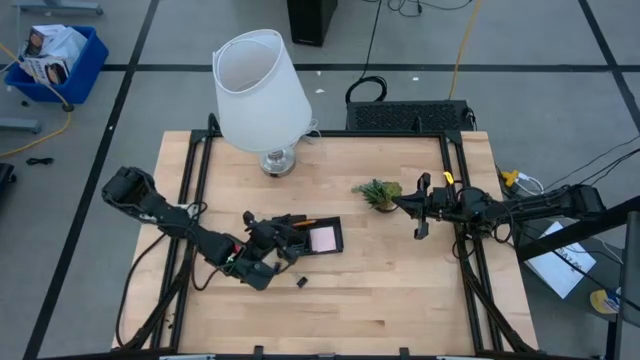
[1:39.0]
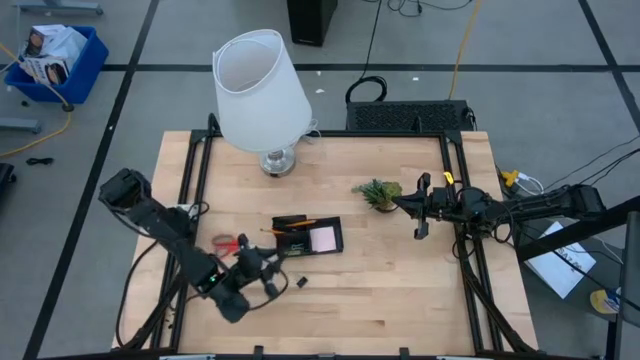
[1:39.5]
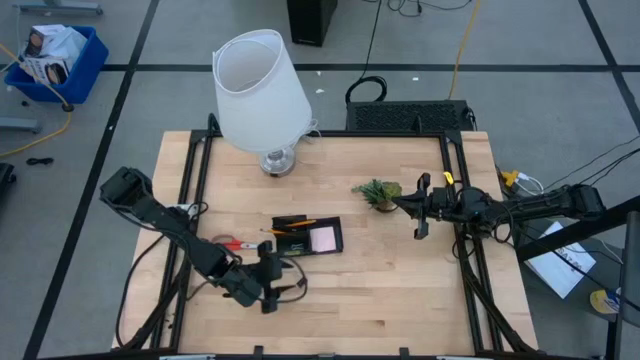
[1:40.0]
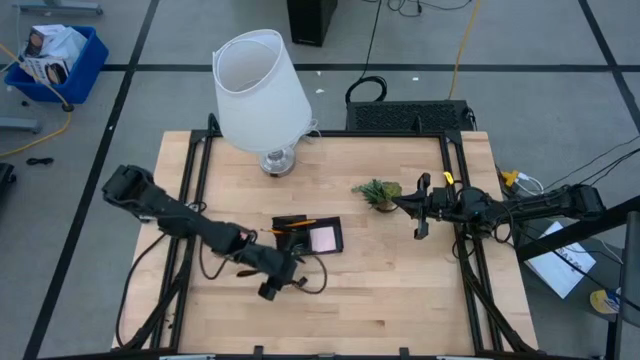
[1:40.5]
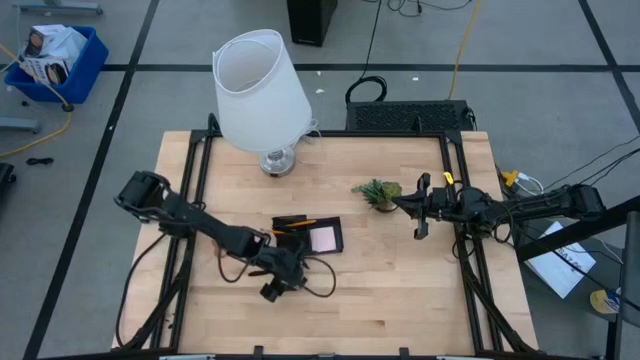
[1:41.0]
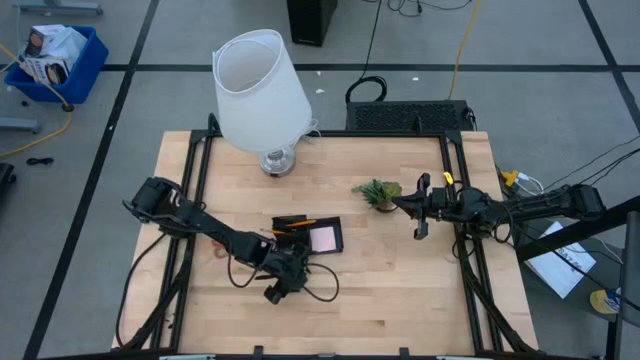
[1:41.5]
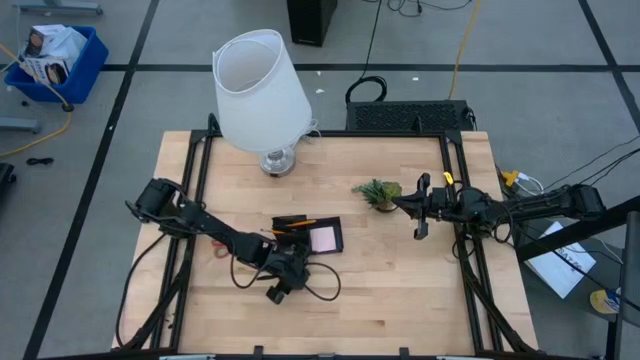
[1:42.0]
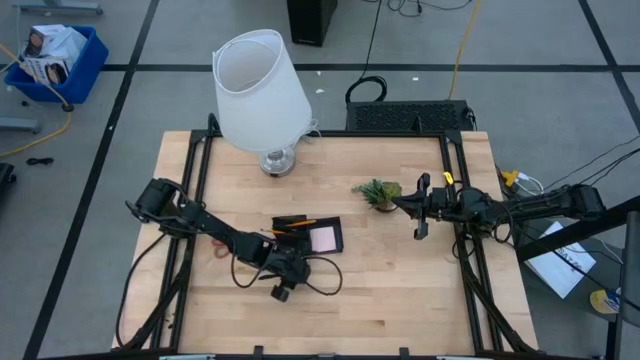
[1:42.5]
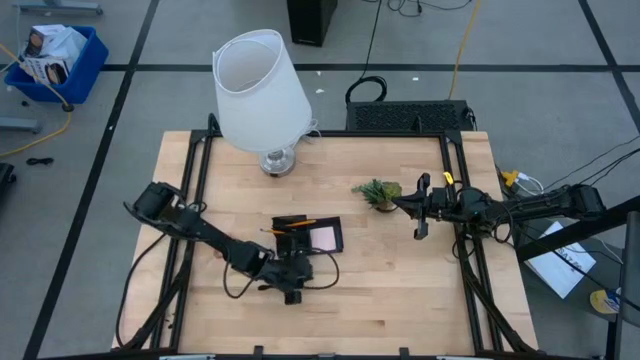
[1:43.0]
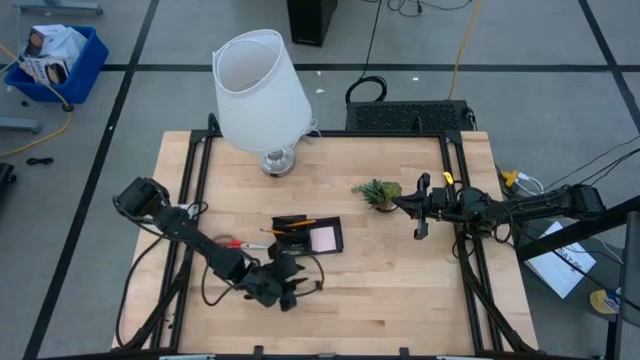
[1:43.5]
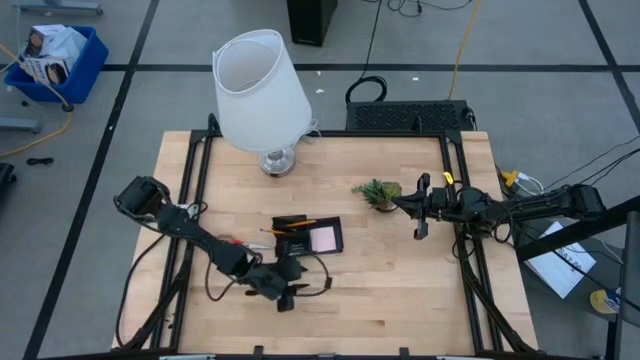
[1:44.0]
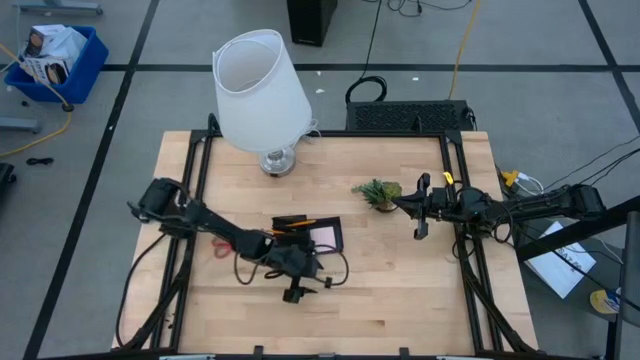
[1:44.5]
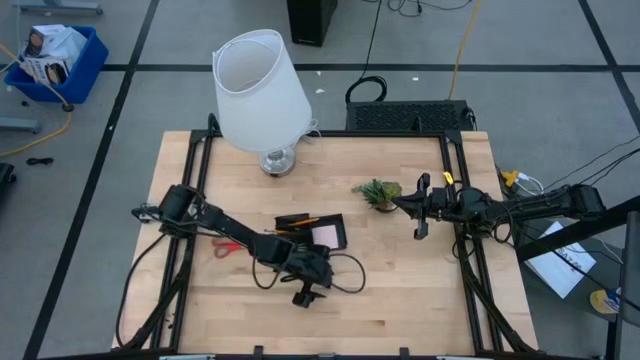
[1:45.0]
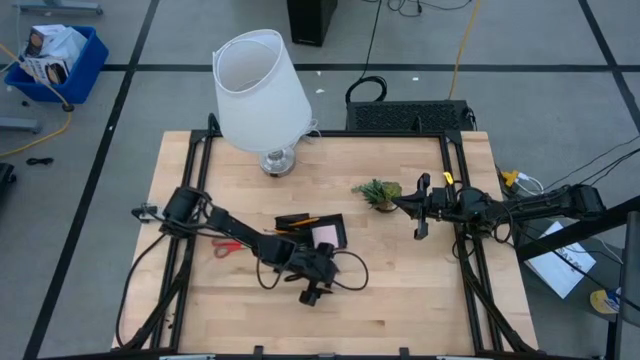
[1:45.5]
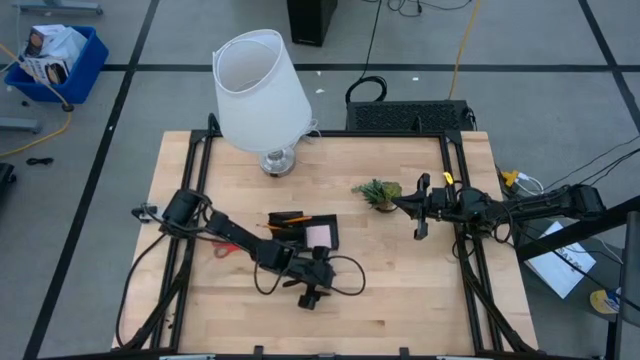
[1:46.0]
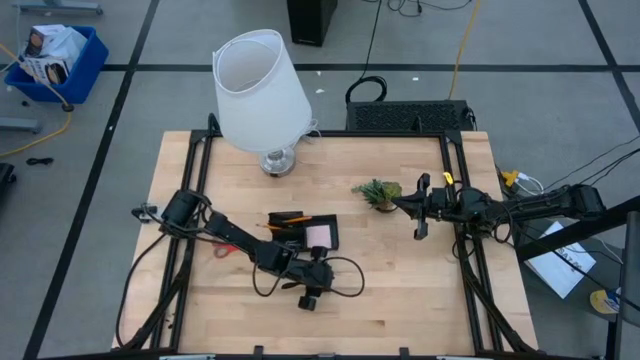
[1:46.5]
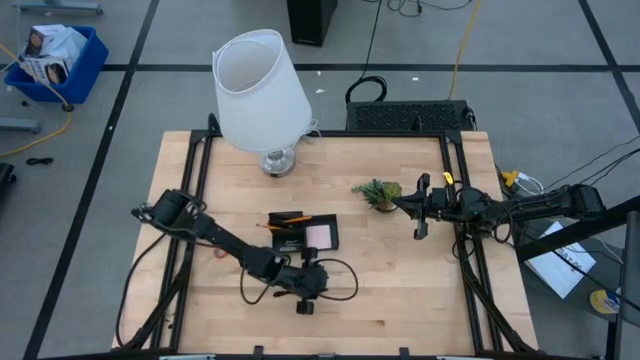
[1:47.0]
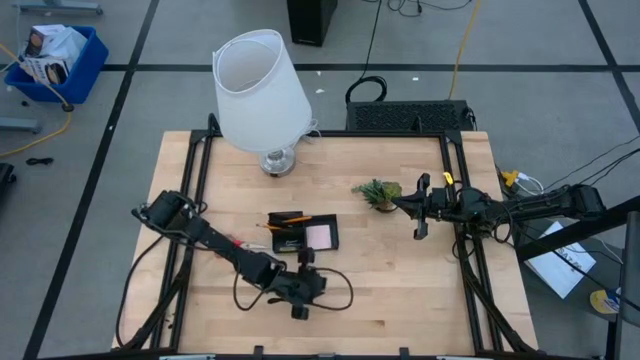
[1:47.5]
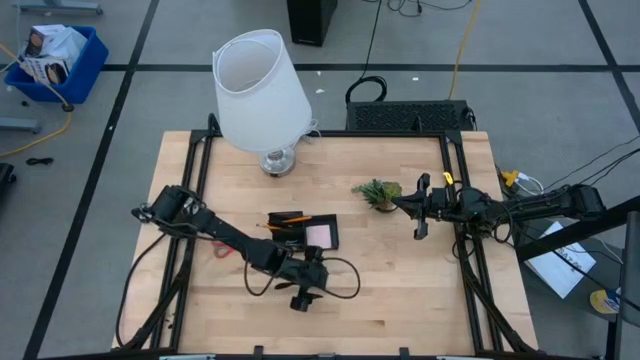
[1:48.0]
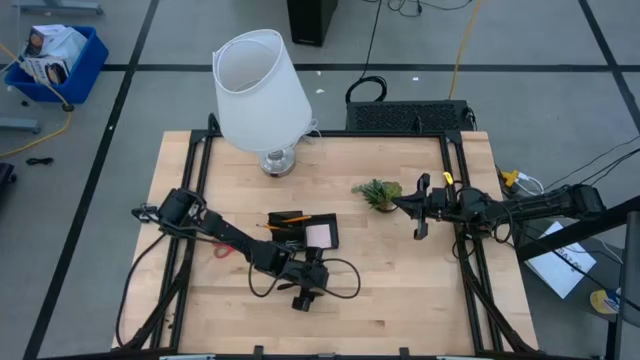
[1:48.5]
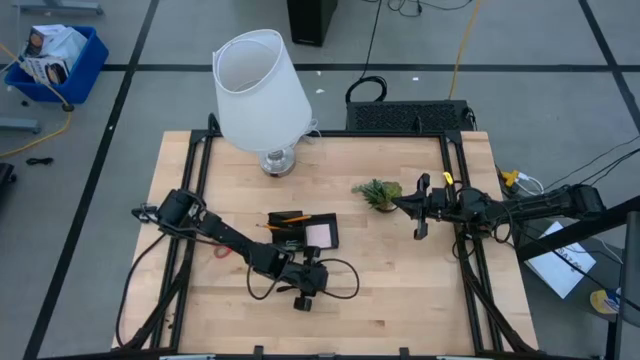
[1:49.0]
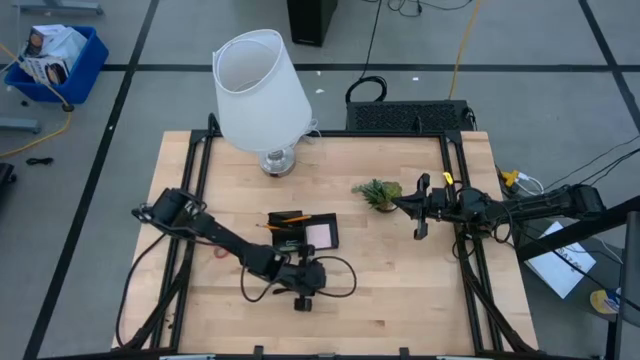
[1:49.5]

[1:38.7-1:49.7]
Task: Pick and place office supplies into organizer
Put the bottom black binder clip into the black desk organizer

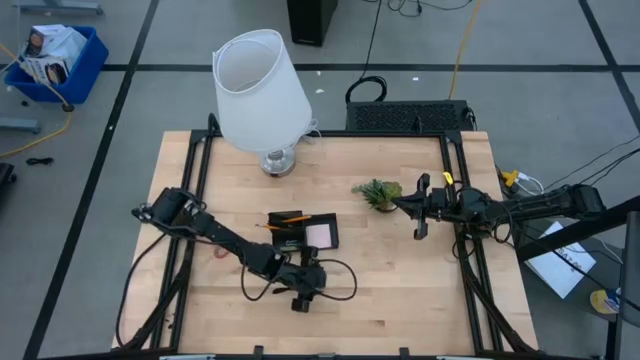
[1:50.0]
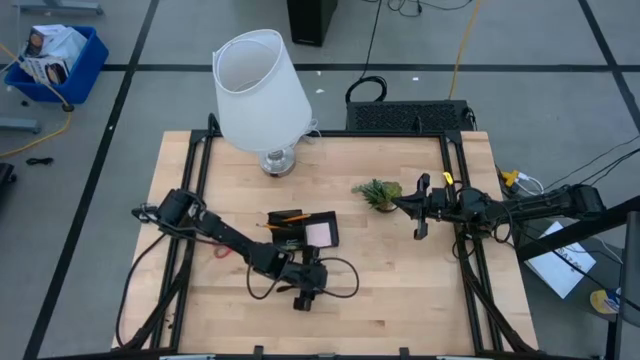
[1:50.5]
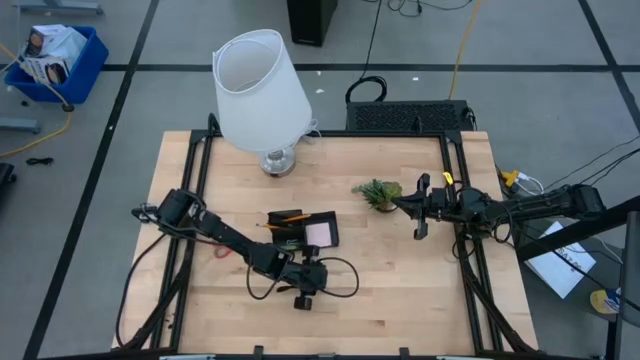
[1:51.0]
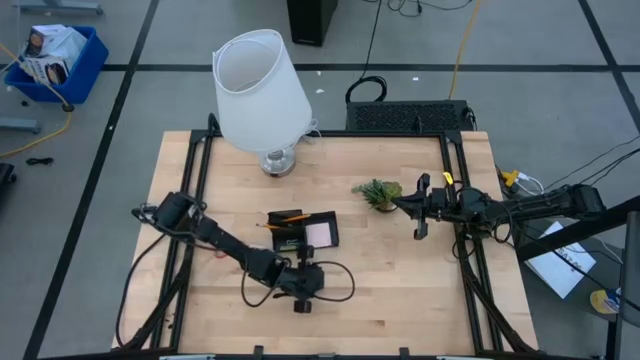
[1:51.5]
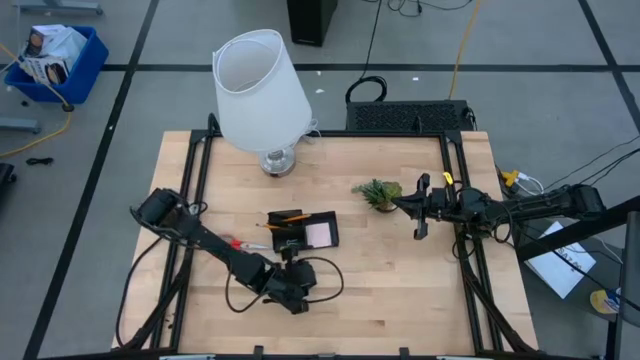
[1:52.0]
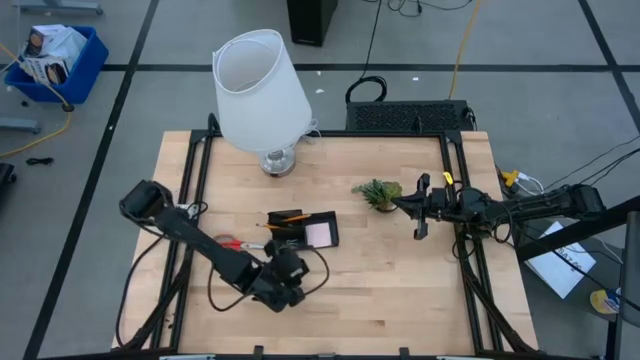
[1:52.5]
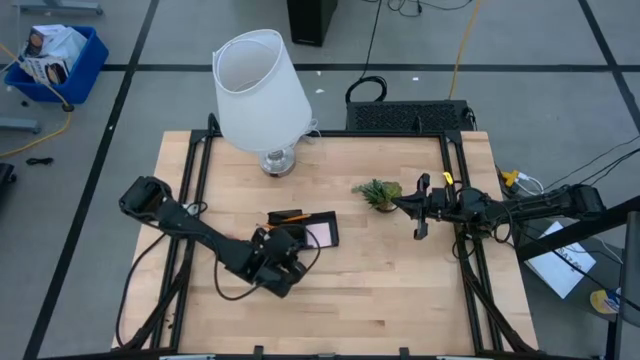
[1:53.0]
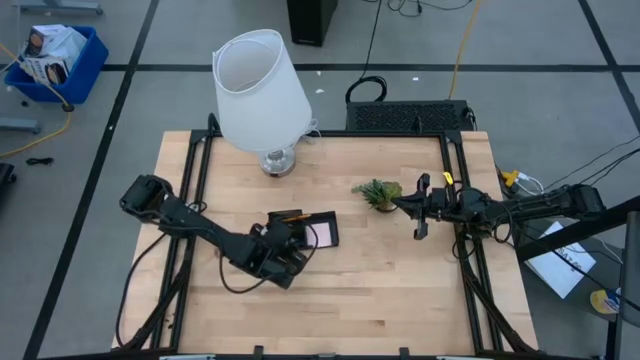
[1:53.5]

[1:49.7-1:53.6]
Put the bottom black binder clip into the black desk organizer

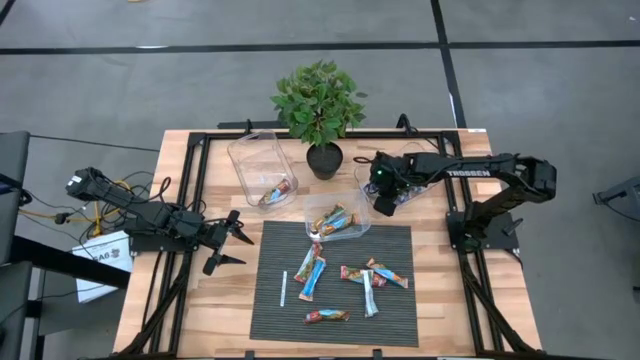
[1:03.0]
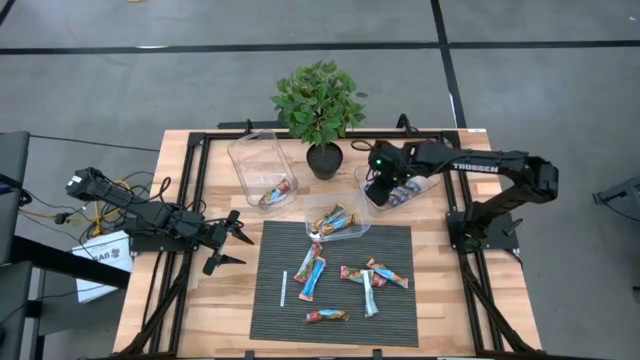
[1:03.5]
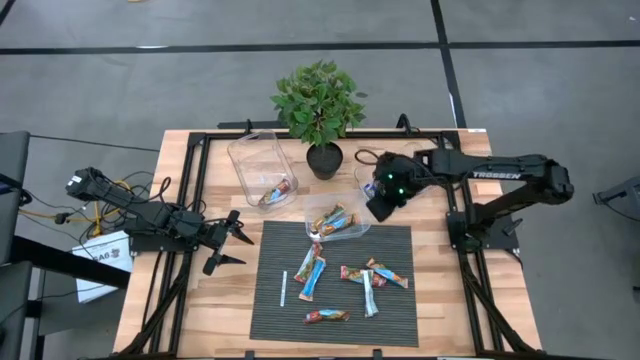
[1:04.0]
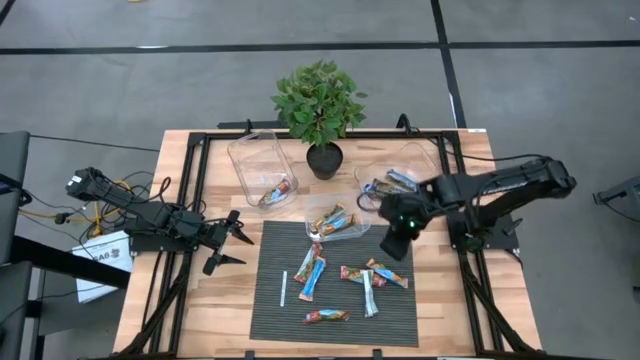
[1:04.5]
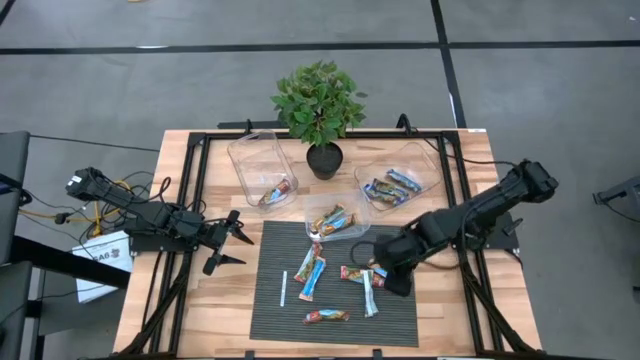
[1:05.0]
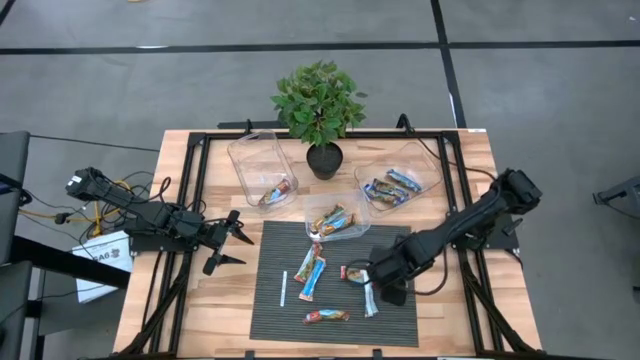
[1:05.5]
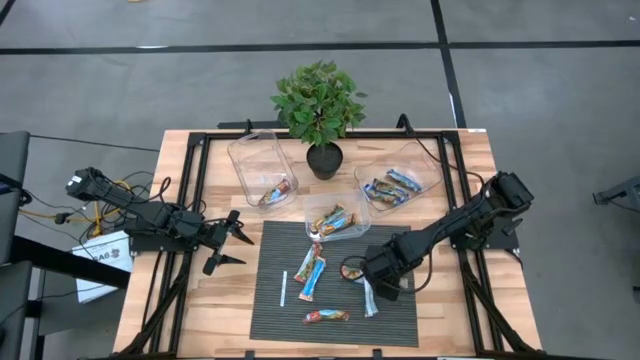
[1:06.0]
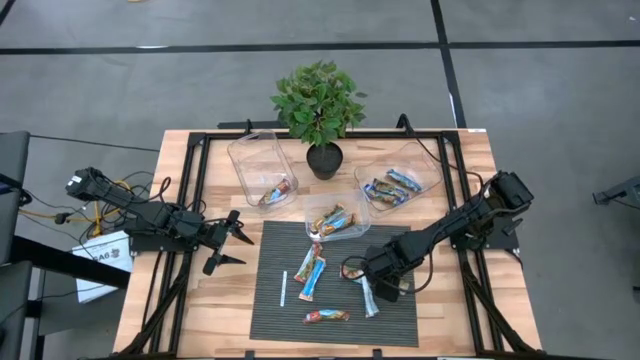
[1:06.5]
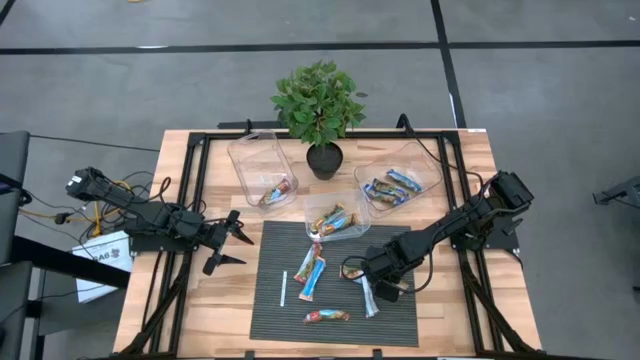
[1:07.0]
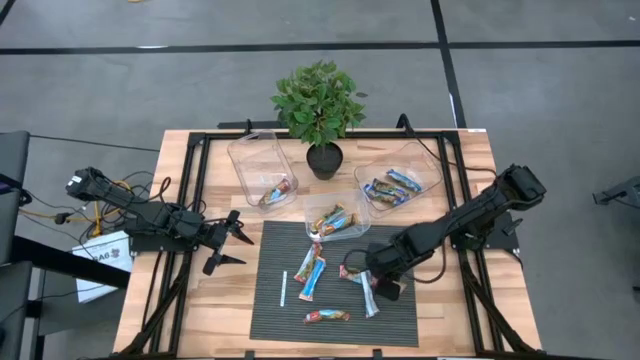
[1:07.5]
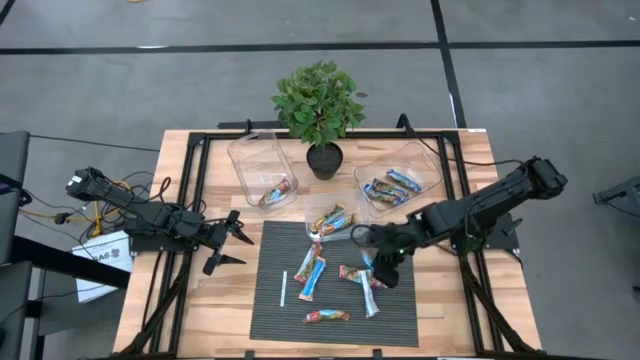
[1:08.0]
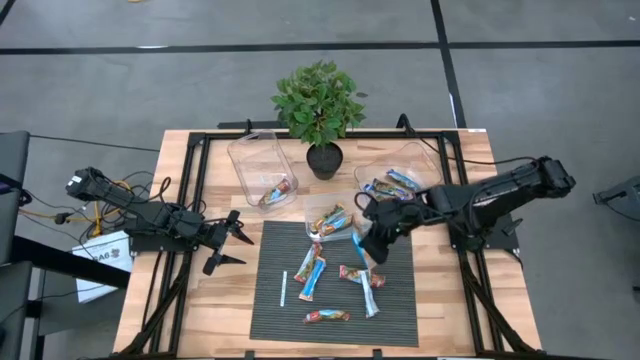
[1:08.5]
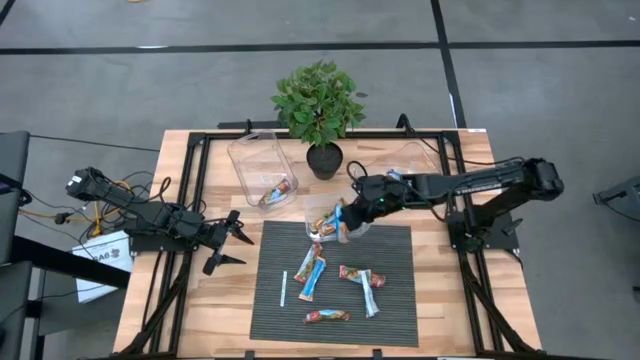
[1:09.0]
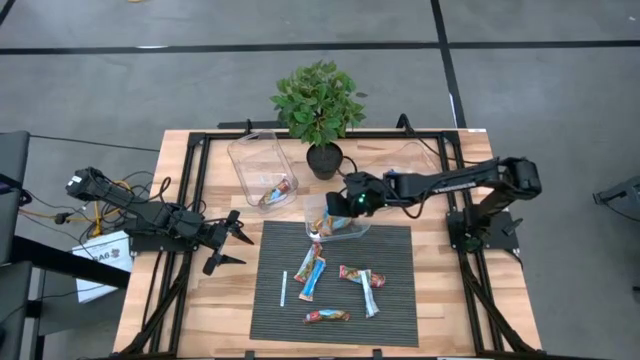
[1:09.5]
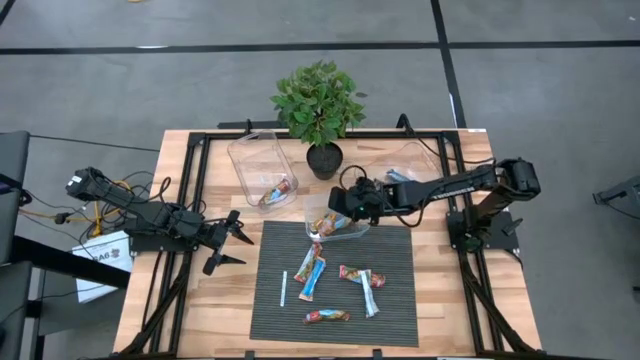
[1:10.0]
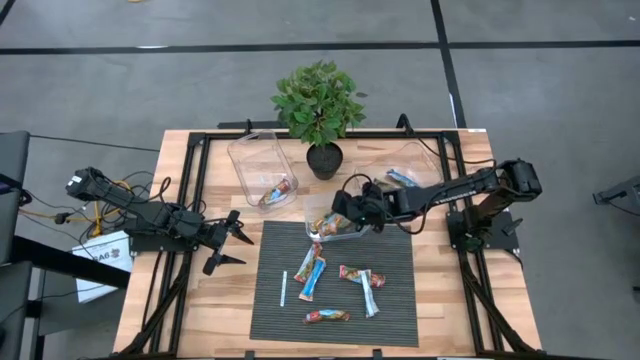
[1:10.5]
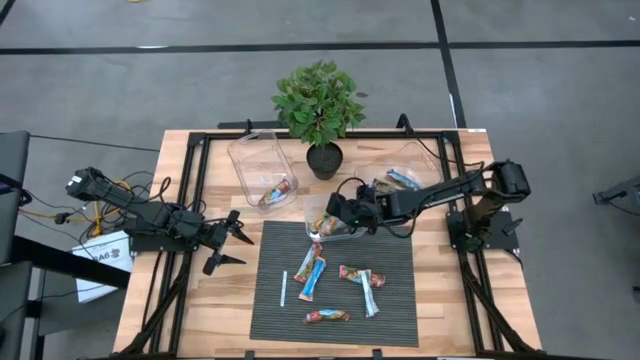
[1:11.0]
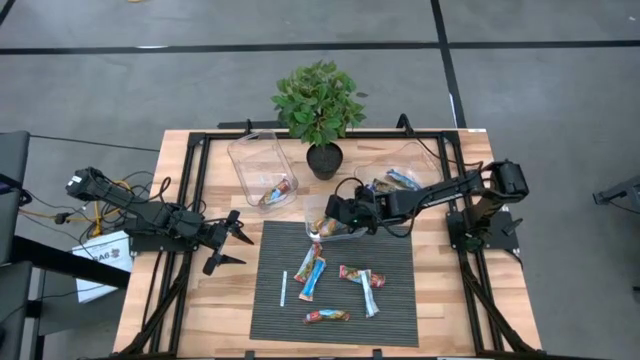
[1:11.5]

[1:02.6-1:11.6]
Task: Pick and place Granola Bars by type
Put the orange granola bar into the middle transparent bin
